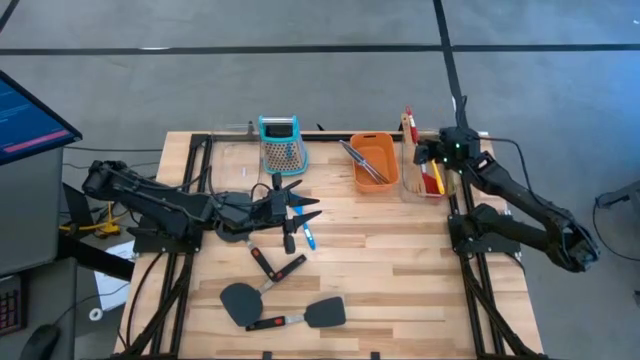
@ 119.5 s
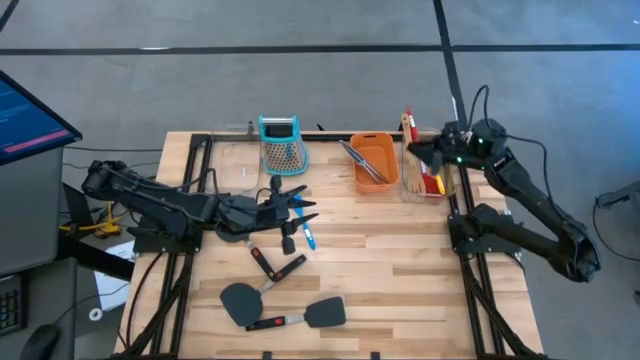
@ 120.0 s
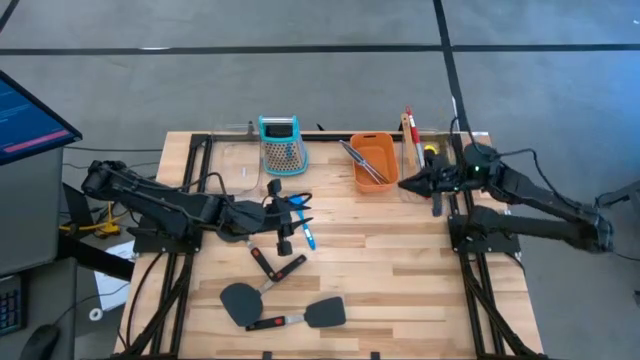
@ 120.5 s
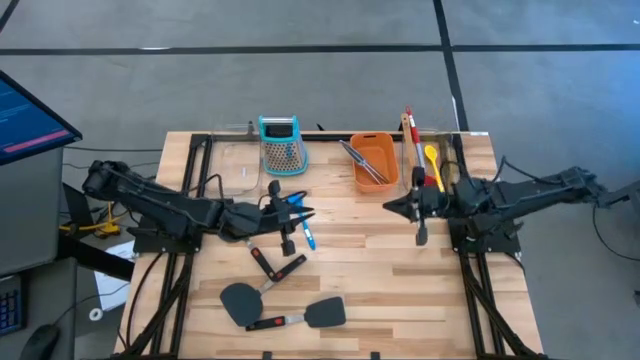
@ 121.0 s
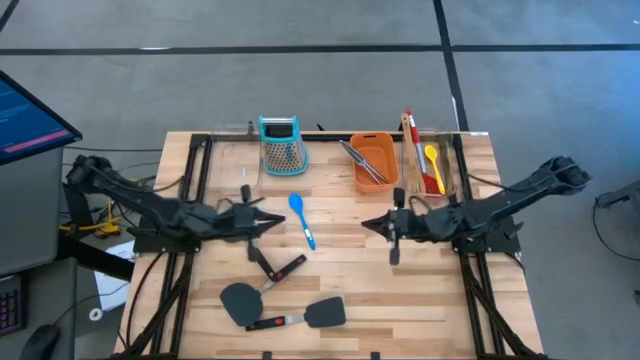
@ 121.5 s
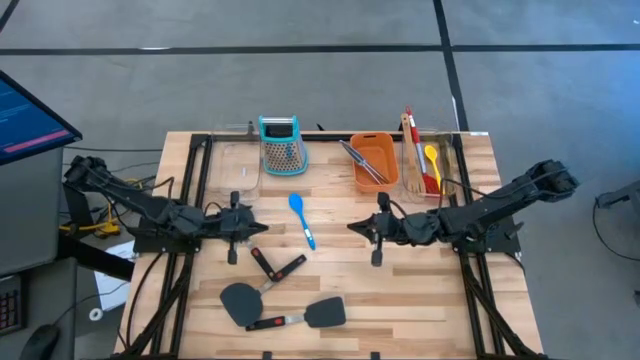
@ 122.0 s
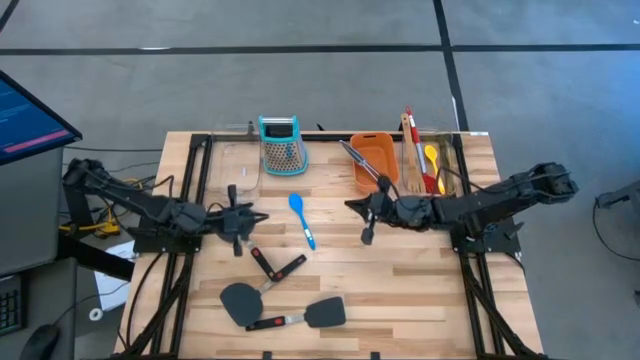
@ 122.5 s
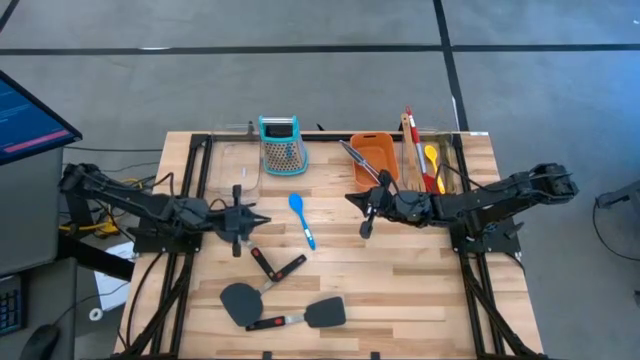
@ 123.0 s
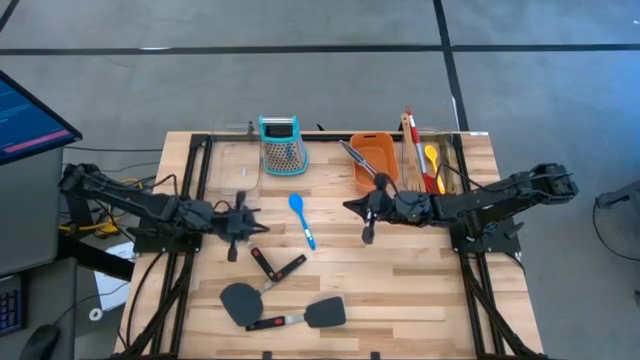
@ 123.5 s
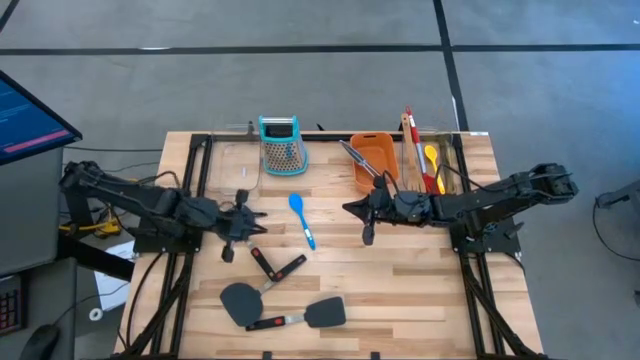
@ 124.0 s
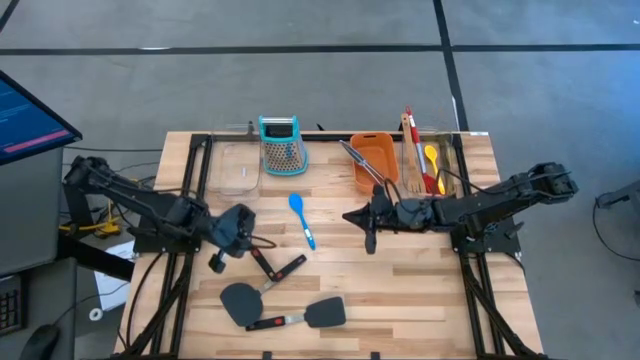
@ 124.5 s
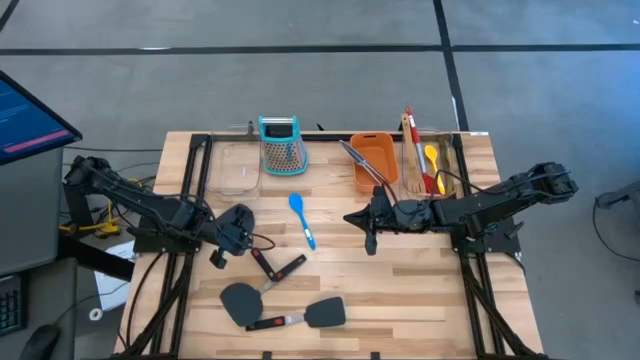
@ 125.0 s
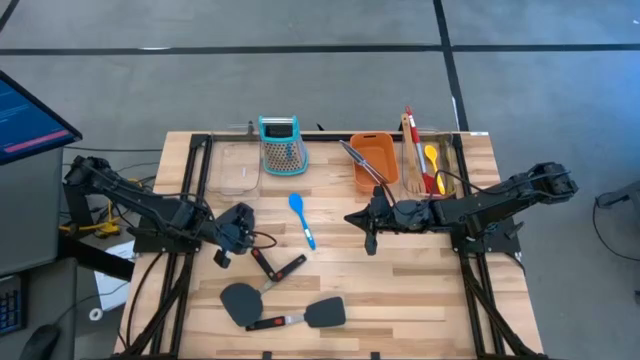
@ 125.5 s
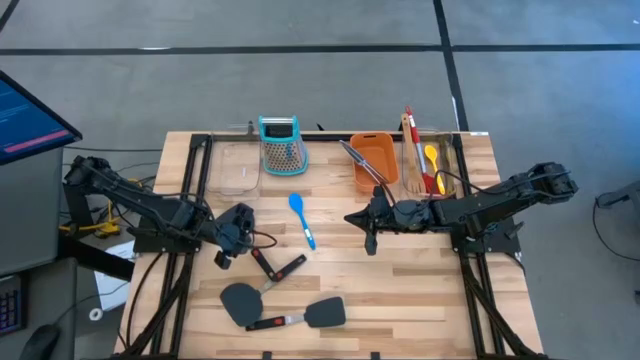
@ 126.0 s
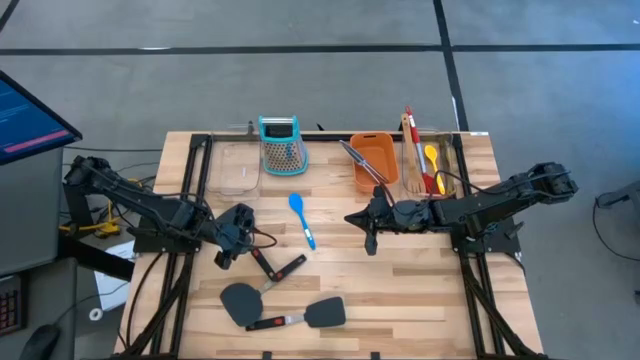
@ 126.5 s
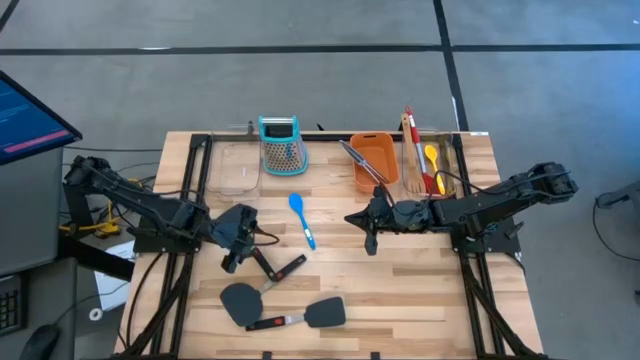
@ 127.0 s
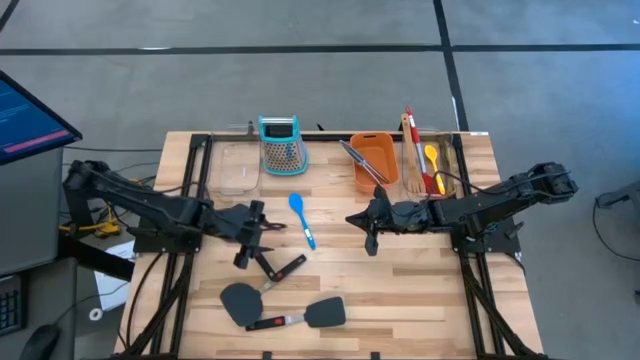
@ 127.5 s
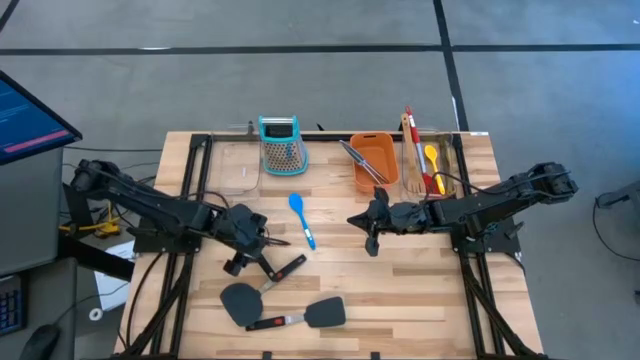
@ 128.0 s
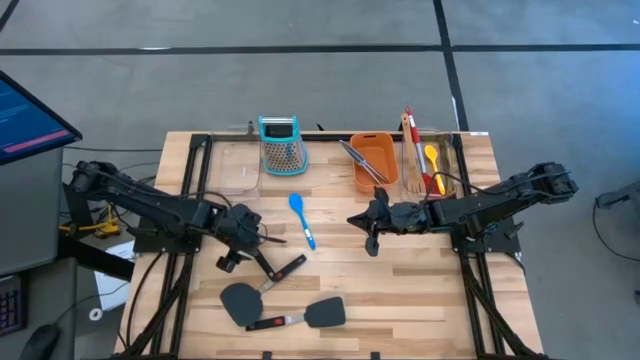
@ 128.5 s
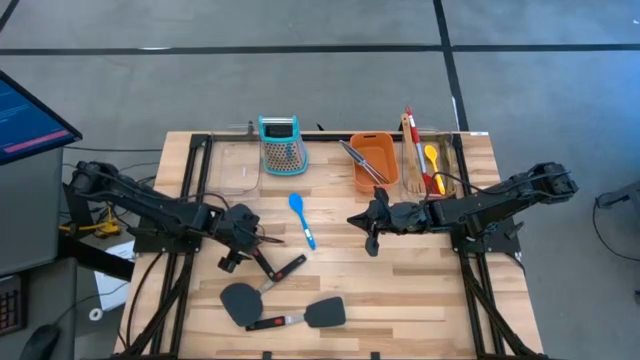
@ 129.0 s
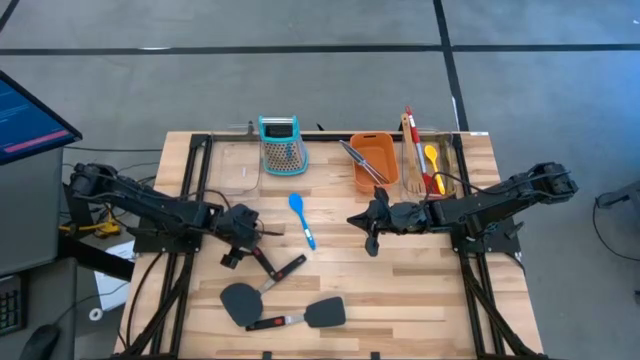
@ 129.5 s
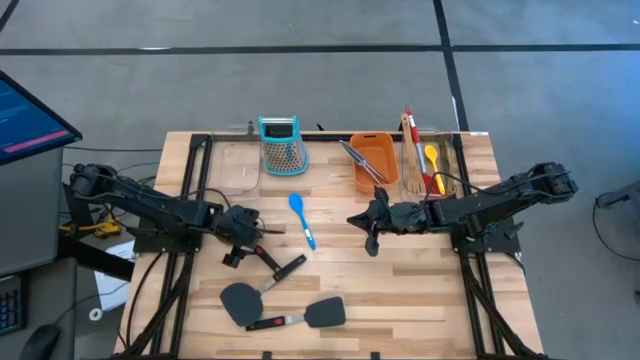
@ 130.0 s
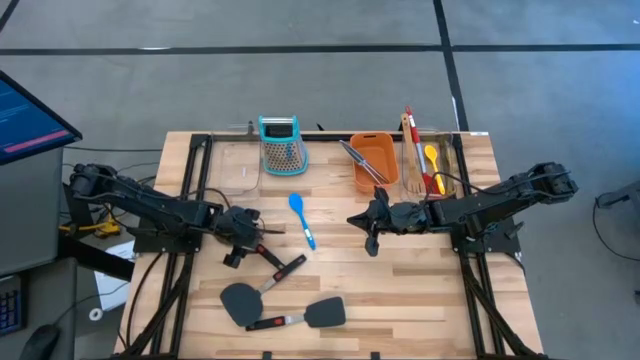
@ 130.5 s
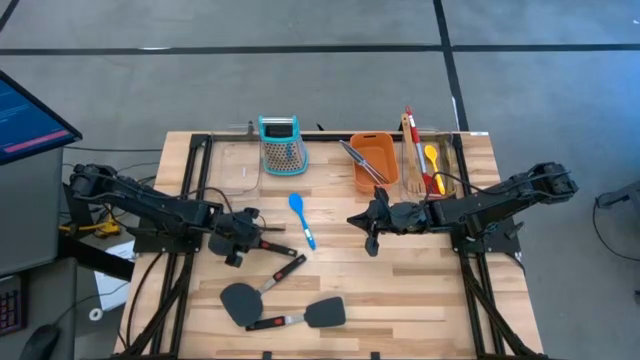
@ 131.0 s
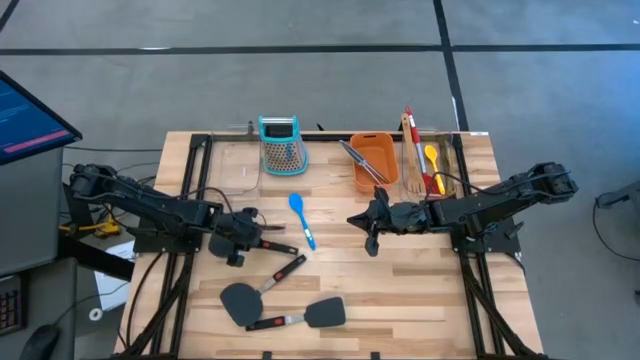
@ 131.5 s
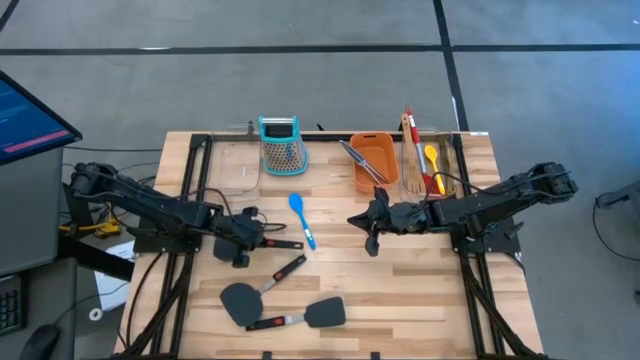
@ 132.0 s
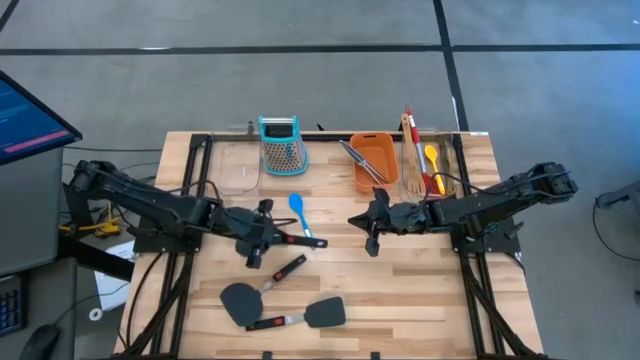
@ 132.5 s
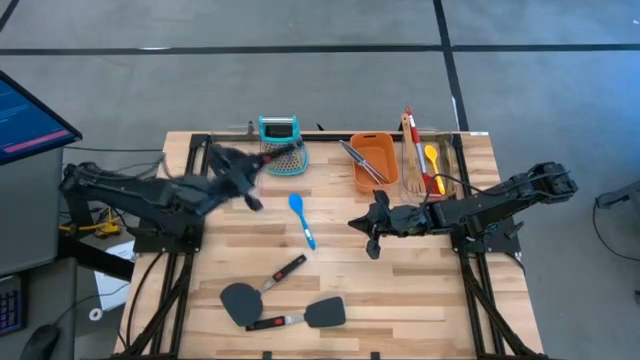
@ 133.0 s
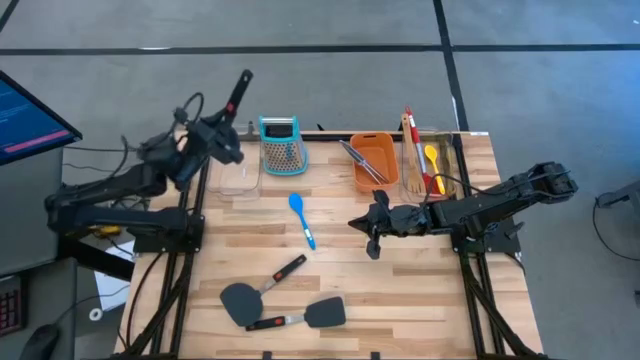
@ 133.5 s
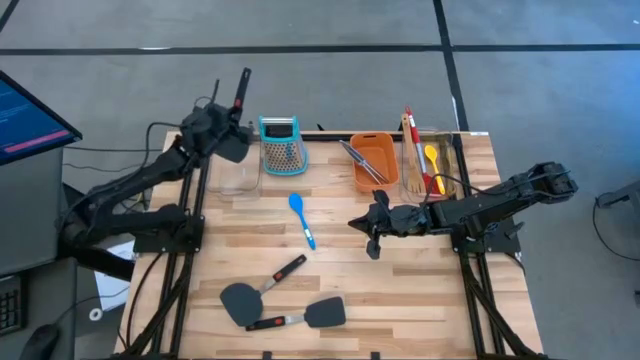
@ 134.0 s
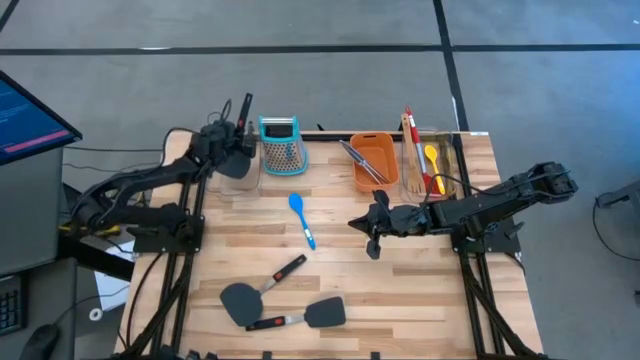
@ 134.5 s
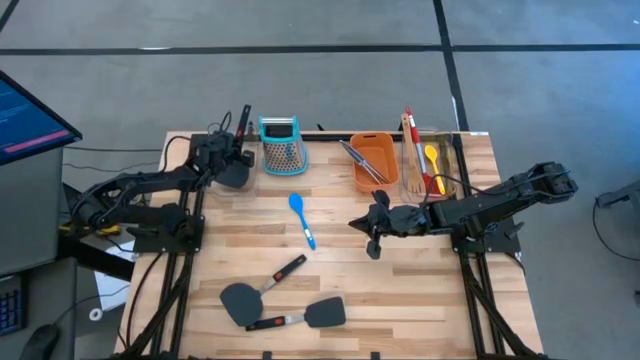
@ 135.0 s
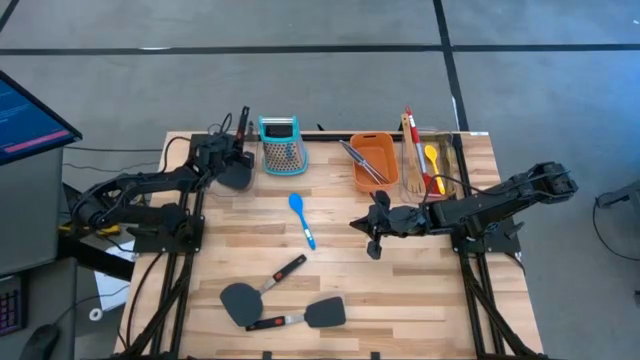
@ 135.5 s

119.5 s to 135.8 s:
Task: Pick & Place Kitchen Items
Put the top black spatula into the left transparent bin

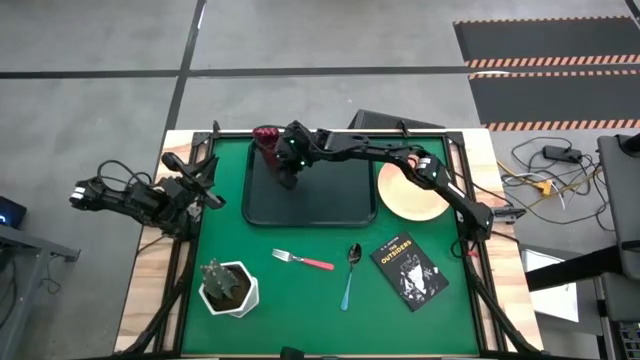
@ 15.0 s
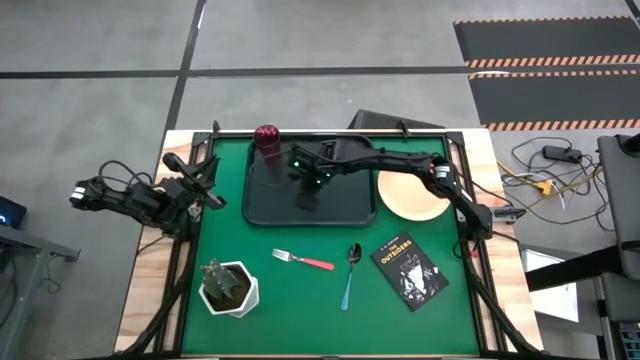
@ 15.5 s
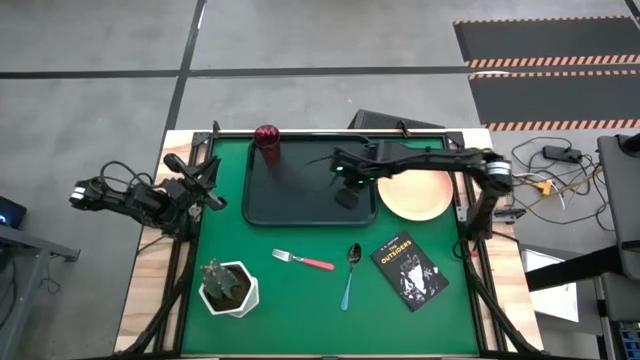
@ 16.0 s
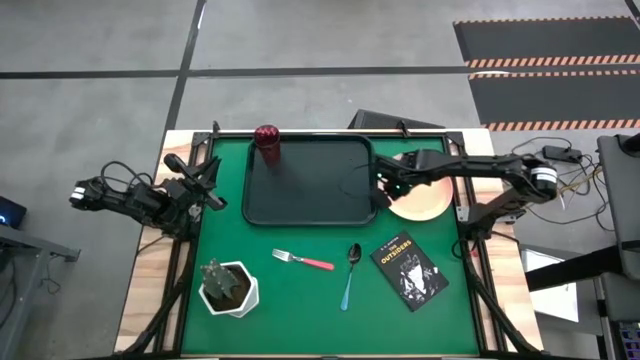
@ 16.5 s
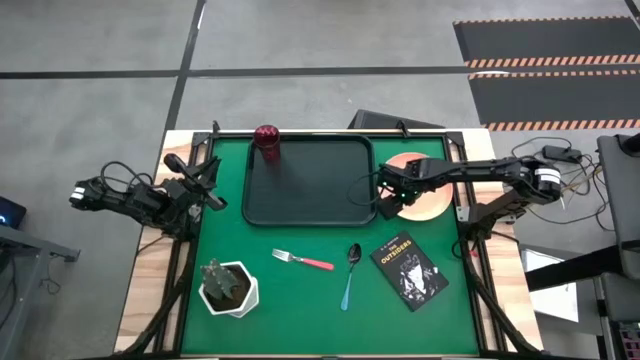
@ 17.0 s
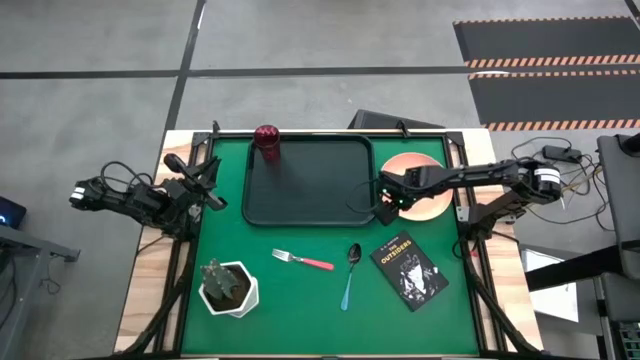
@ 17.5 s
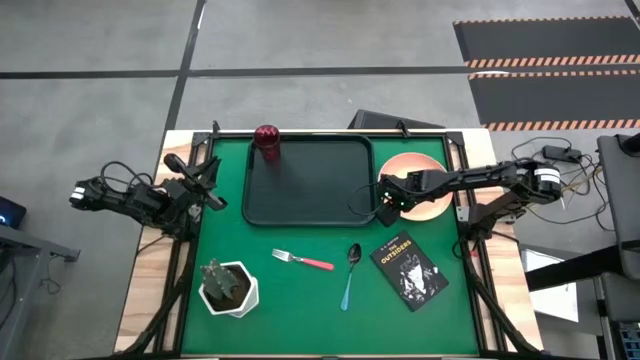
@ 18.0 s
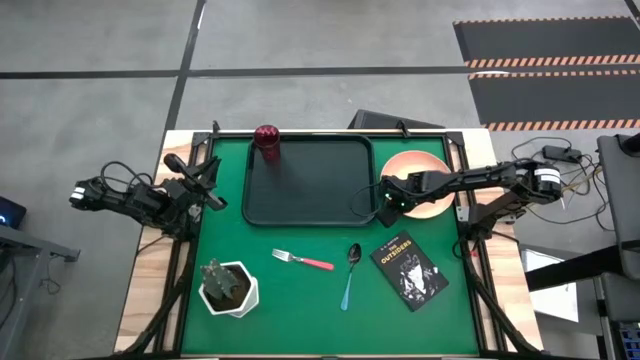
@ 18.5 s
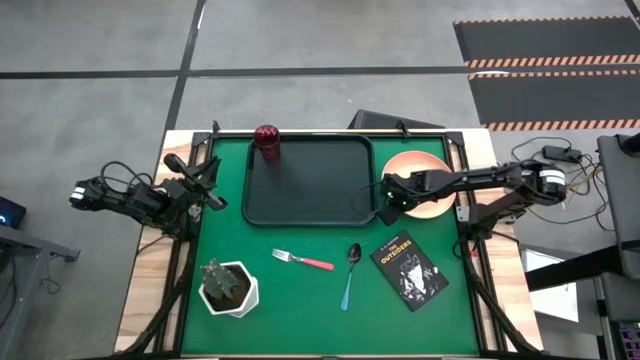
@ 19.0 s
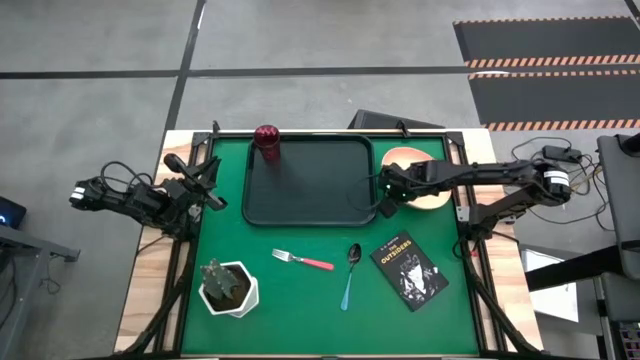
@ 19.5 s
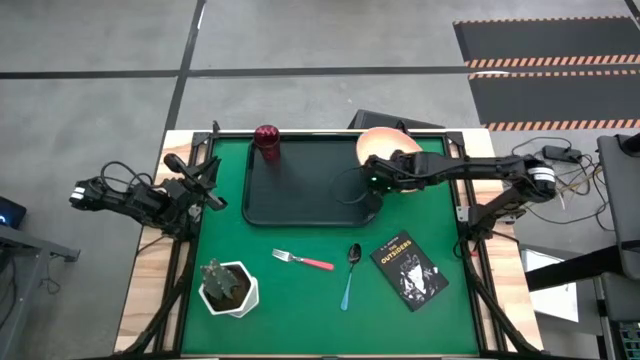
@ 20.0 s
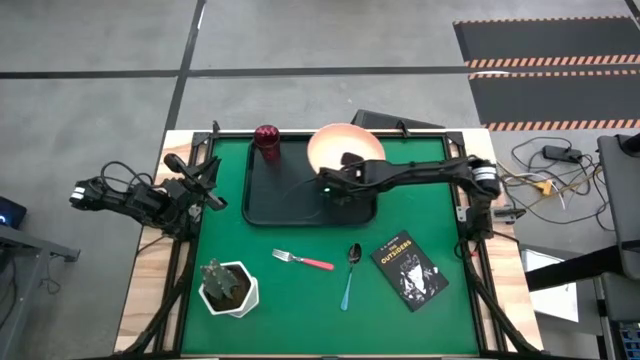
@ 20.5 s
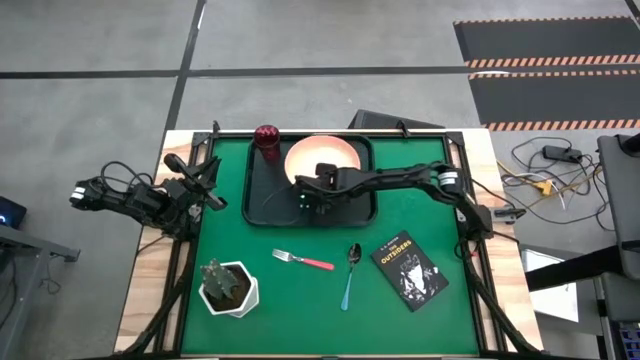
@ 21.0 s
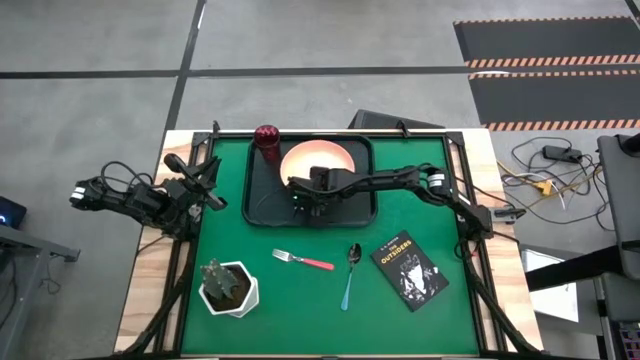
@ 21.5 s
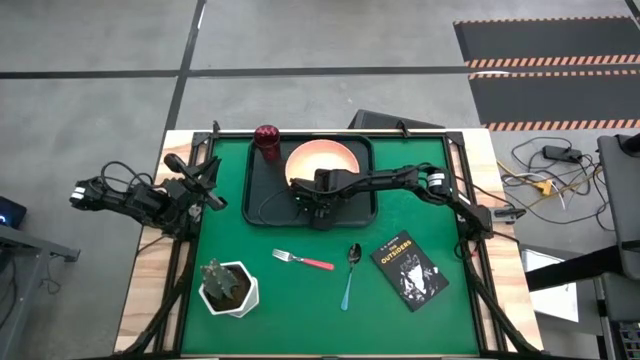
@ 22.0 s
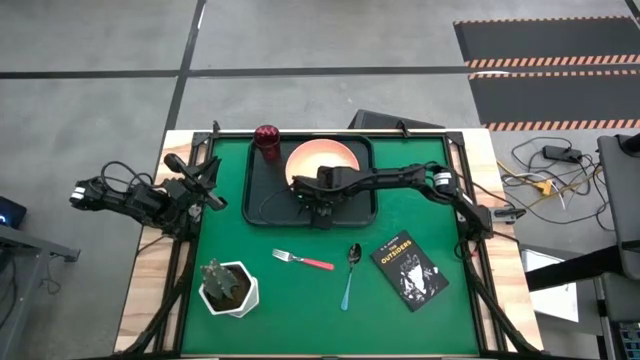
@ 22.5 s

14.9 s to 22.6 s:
Task: Pick and place plate/cup/fork/spoon on tray
Put the light pink plate on the black tray
